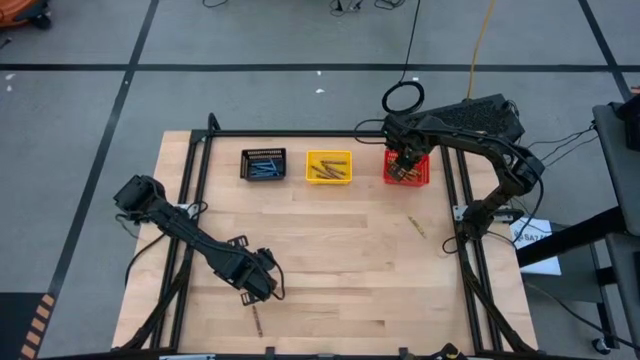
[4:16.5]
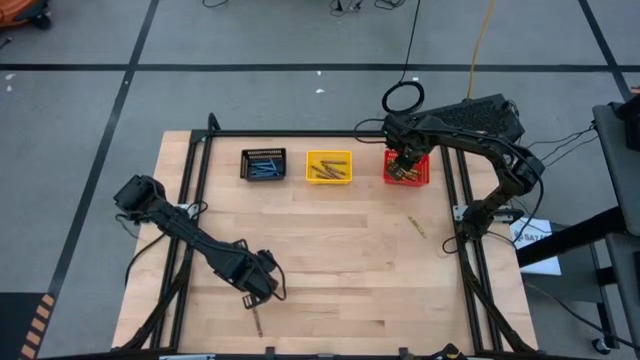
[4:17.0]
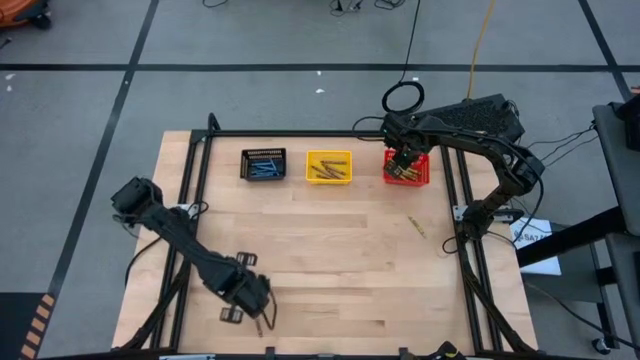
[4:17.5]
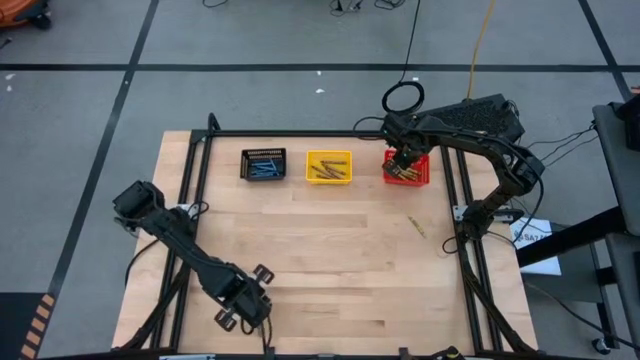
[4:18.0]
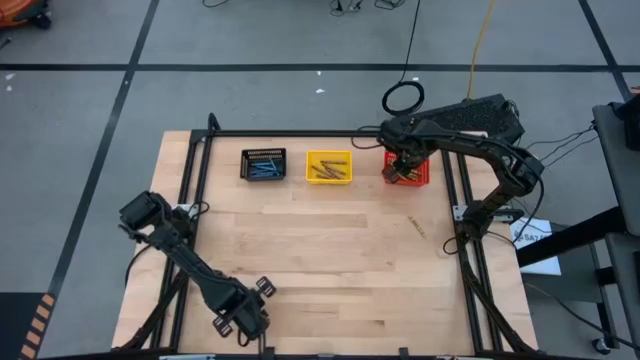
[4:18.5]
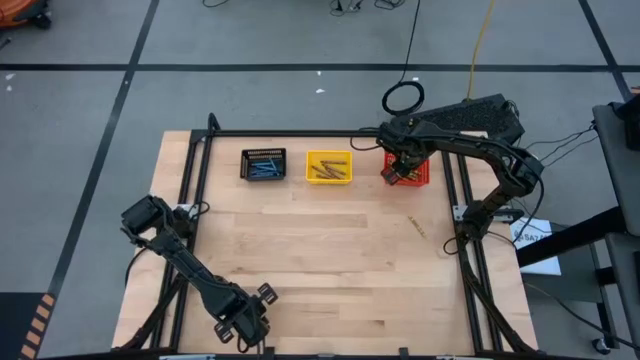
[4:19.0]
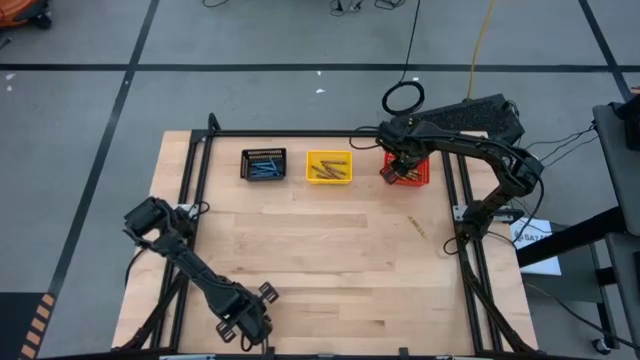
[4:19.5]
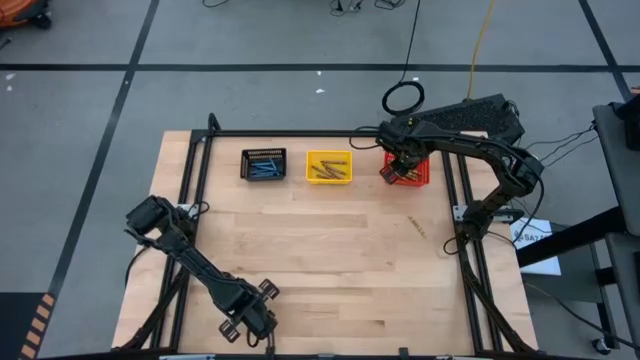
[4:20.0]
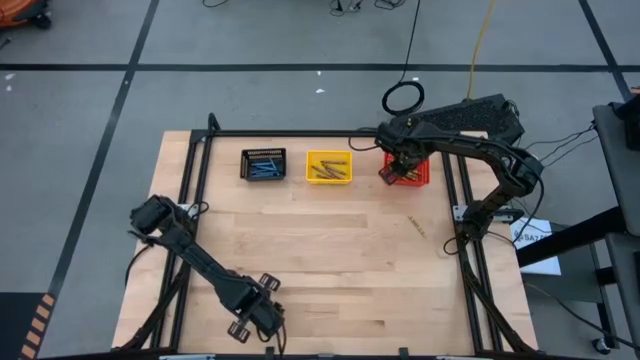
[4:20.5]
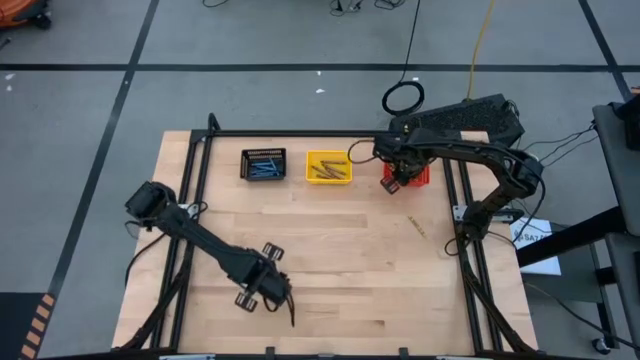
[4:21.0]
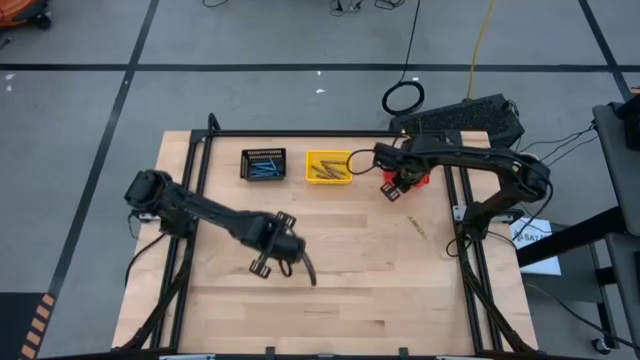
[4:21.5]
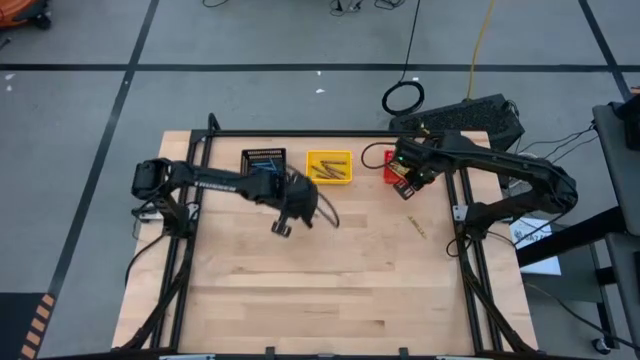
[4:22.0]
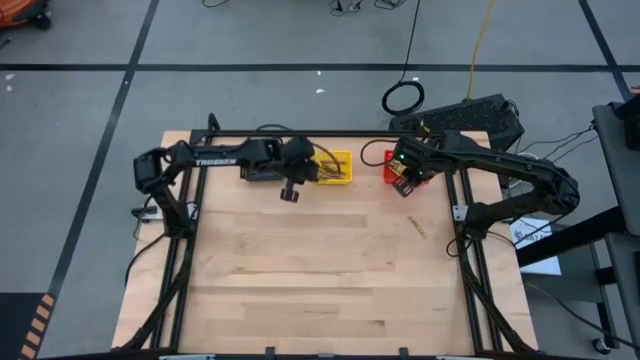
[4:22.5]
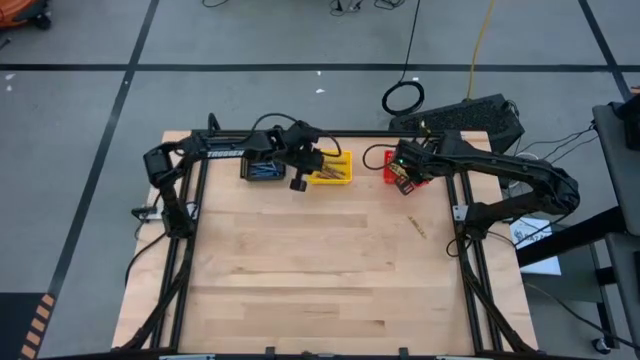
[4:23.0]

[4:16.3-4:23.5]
Task: Sort crayons
Put the brown crayon into the yellow bin

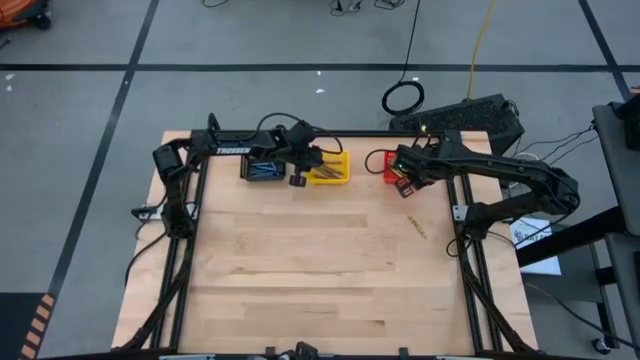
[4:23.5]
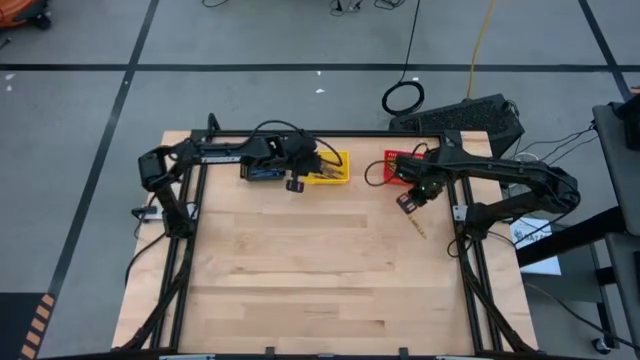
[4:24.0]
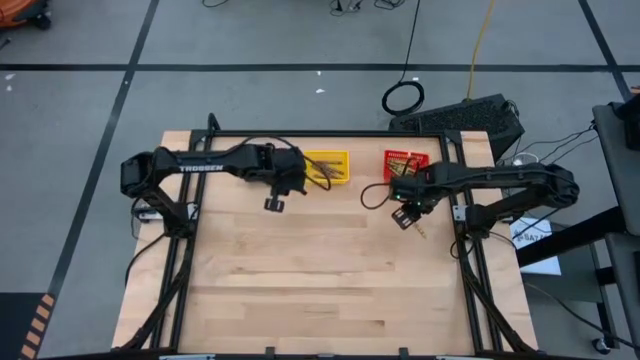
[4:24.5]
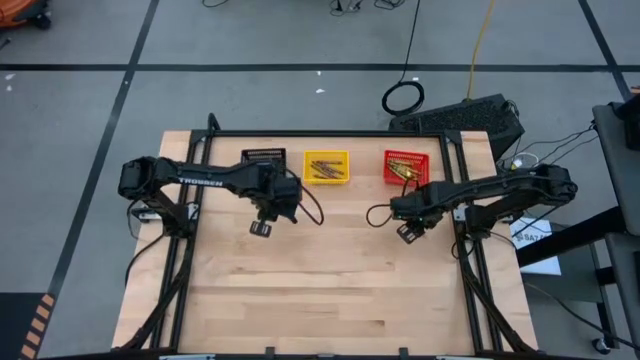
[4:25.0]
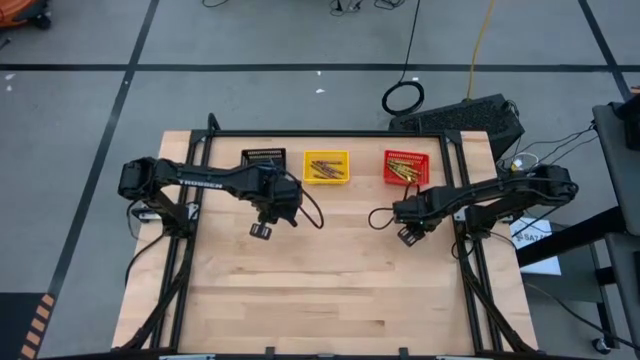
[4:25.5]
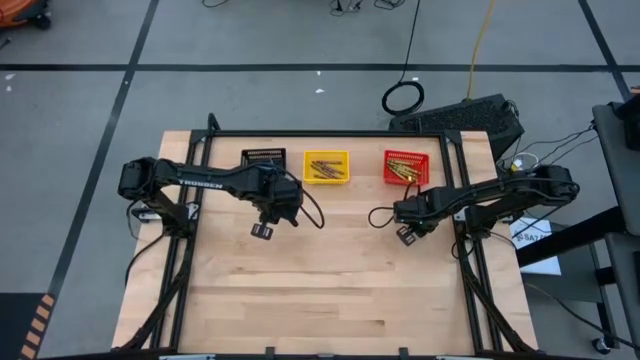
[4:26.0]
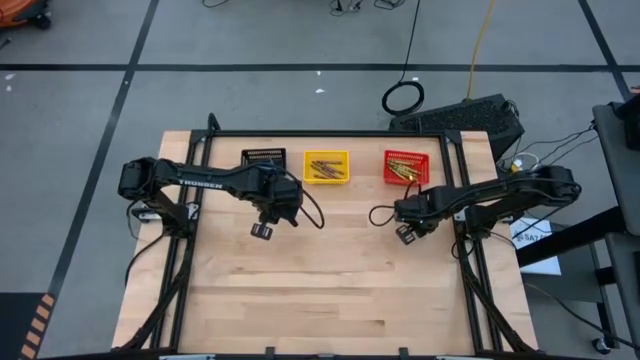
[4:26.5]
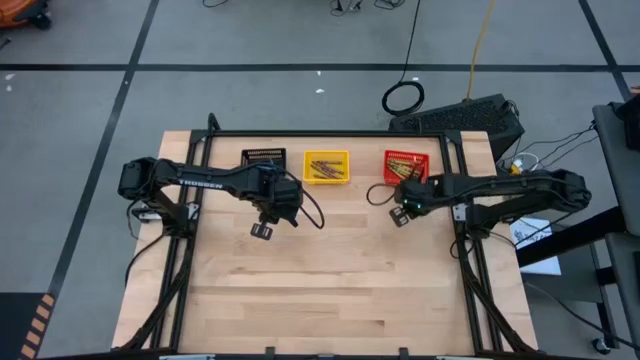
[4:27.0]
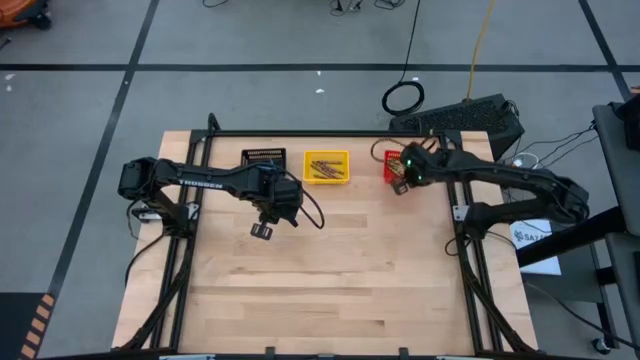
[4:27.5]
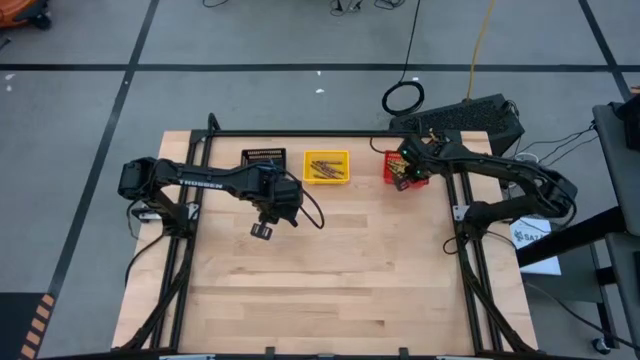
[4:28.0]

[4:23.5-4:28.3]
Put the green crayon into the red bin

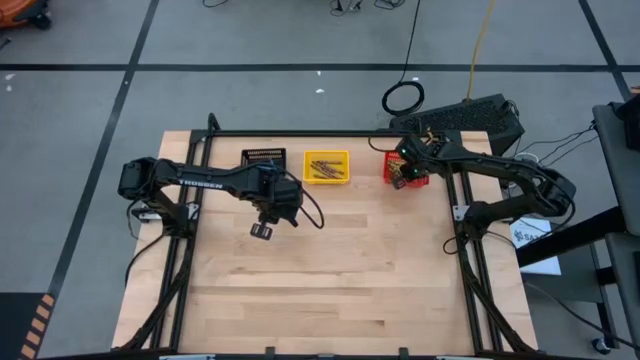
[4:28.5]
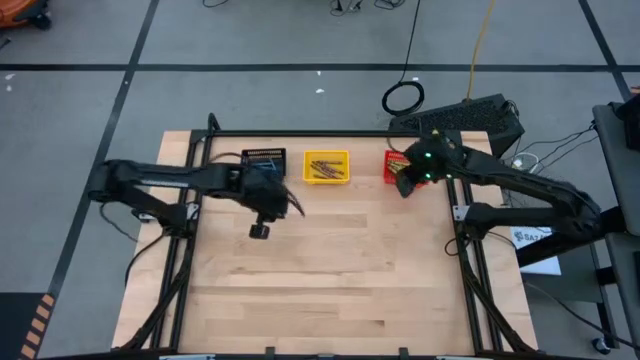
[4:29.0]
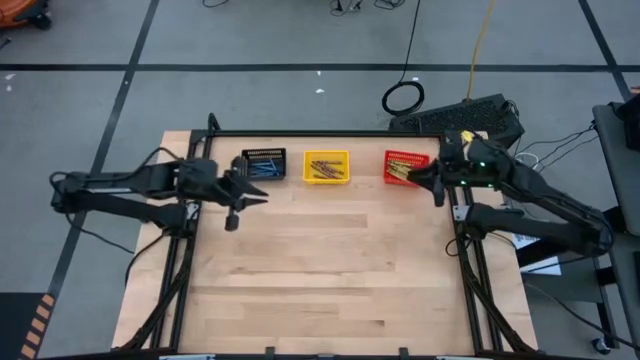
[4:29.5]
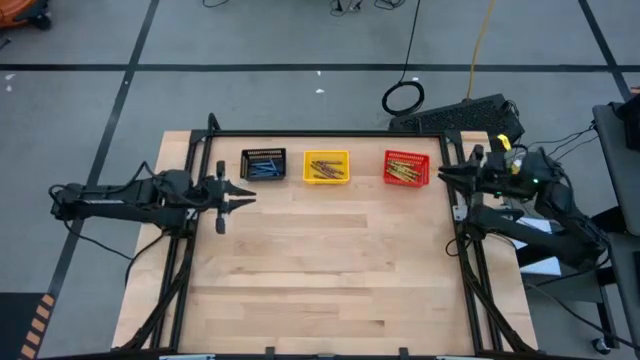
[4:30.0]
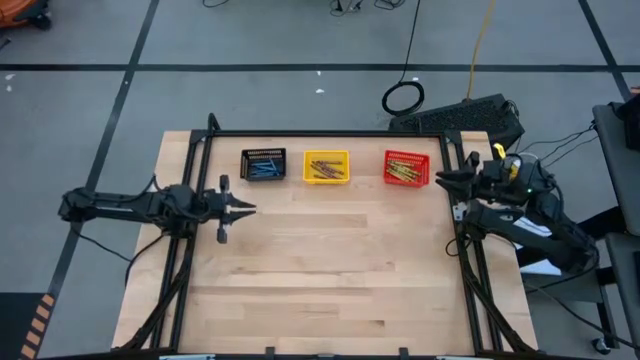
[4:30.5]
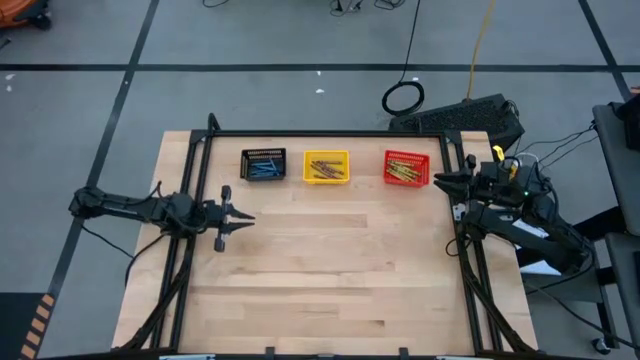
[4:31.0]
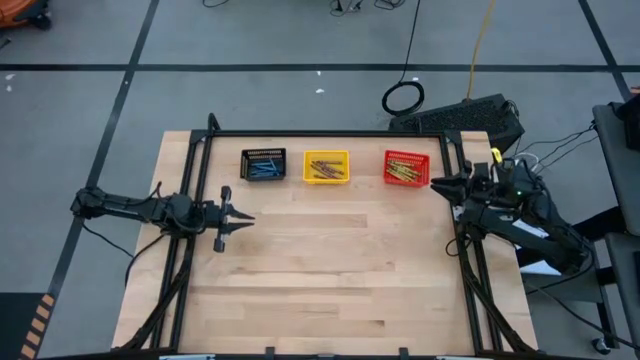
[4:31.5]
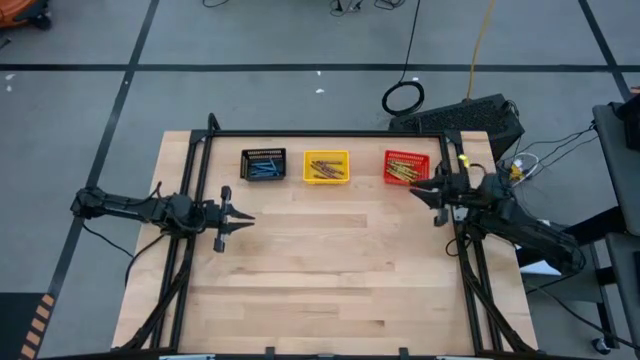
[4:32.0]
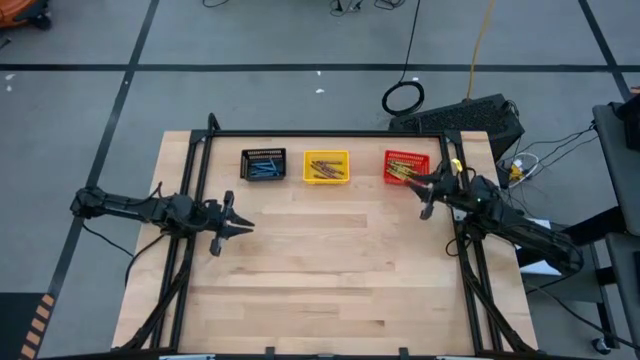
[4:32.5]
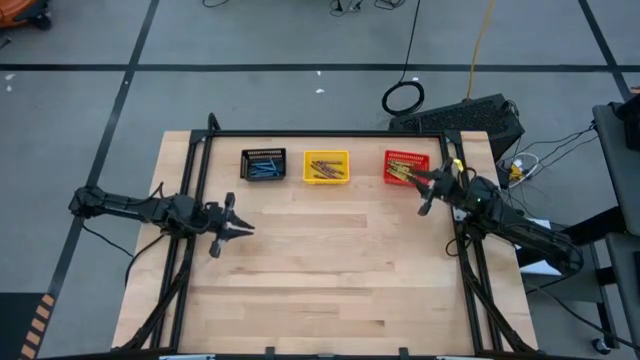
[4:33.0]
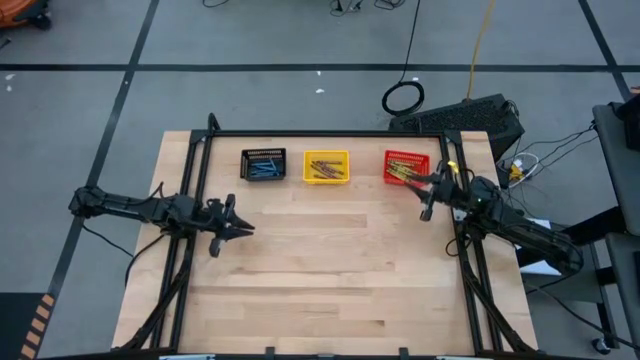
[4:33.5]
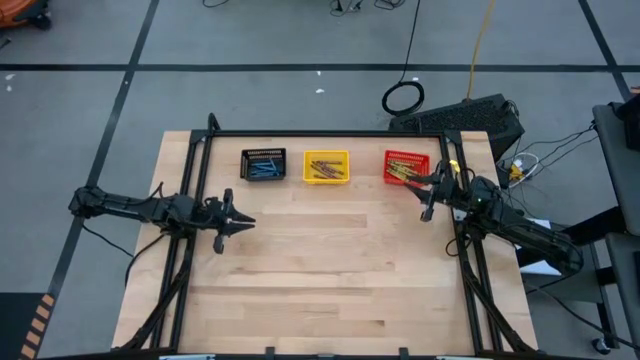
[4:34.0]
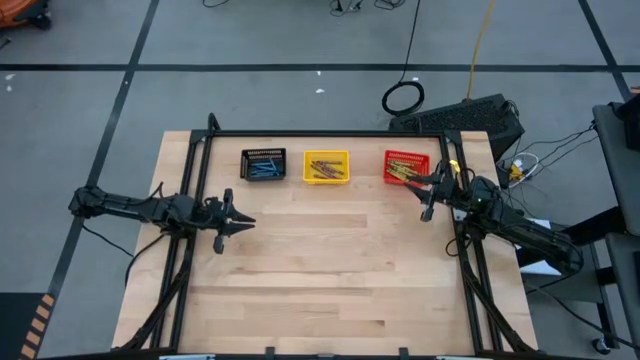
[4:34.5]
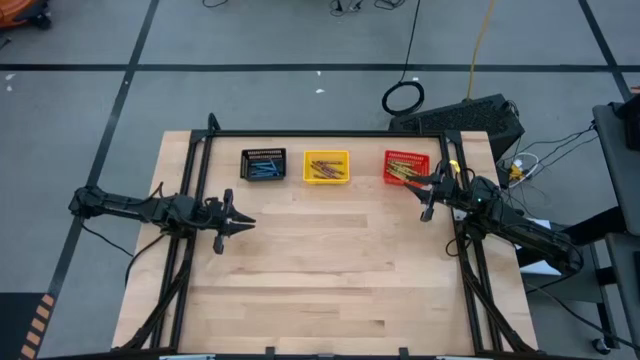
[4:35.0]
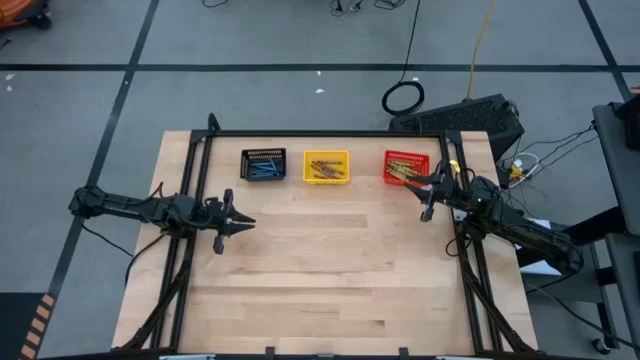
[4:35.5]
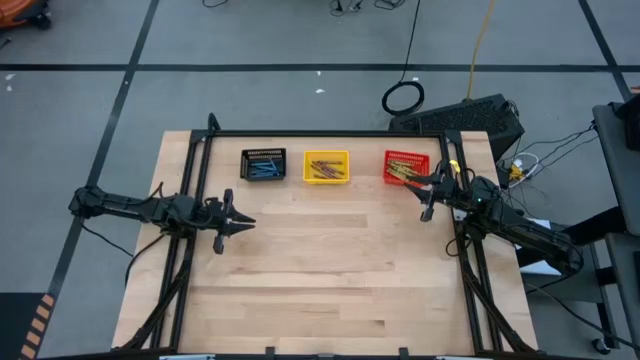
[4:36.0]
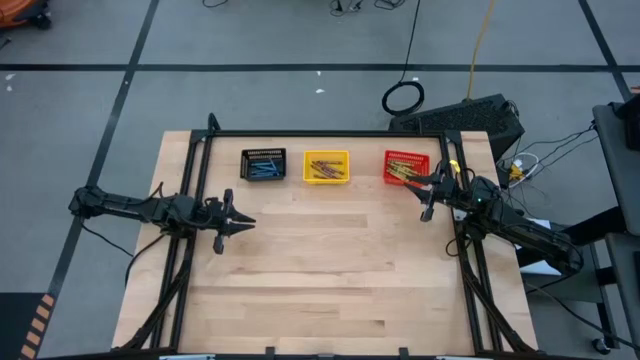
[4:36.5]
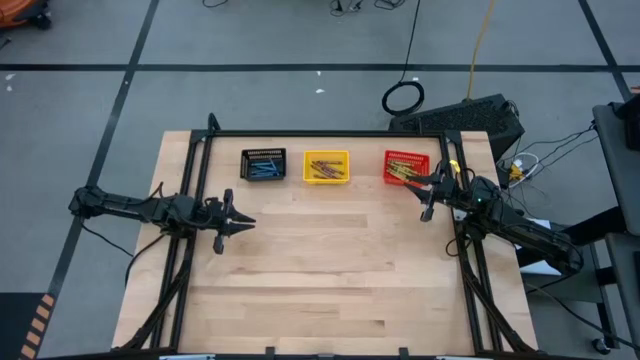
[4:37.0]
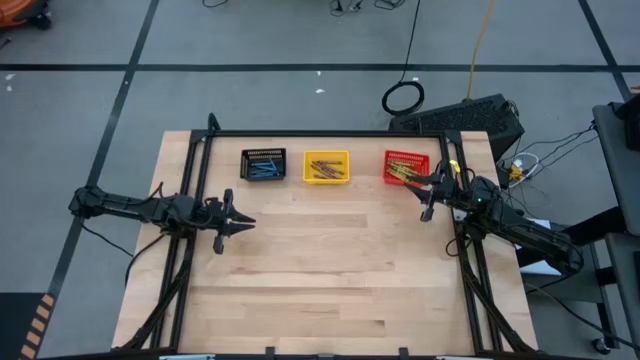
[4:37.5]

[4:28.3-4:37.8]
Return to Home Position

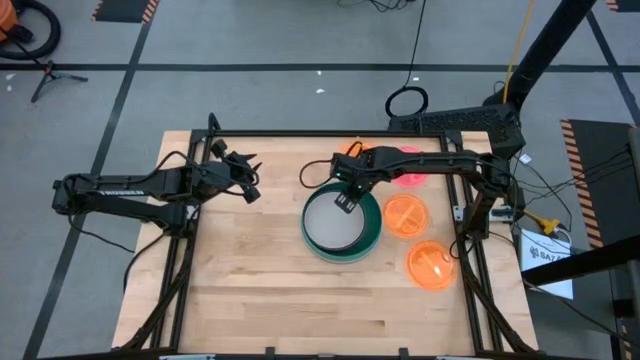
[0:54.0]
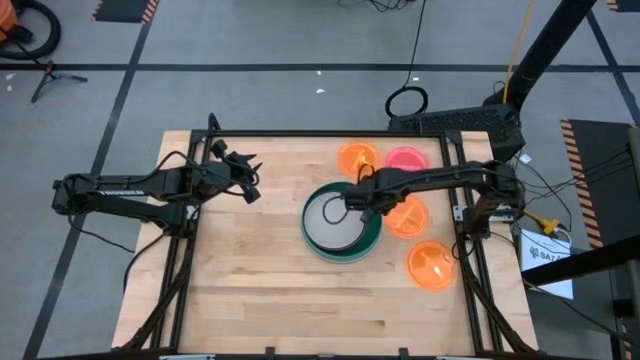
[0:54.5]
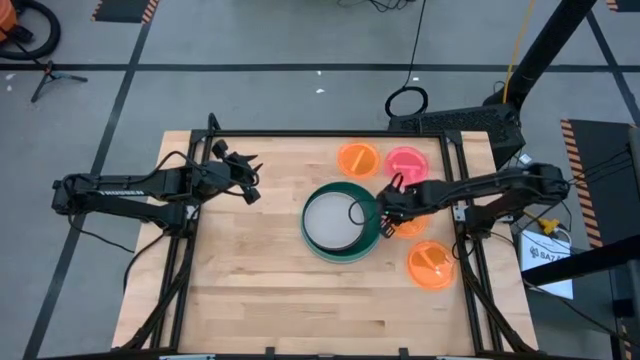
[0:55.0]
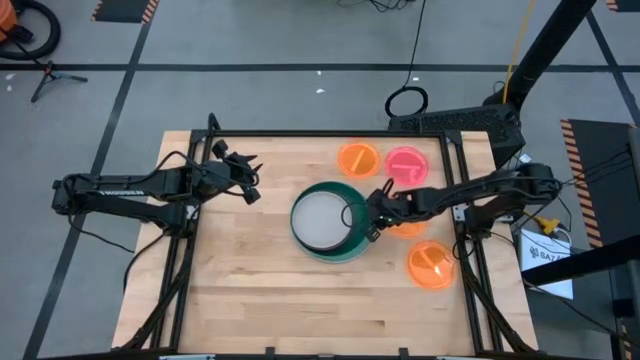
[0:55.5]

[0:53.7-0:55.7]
Task: Stack plastic plates
Adjust the stacked plates
